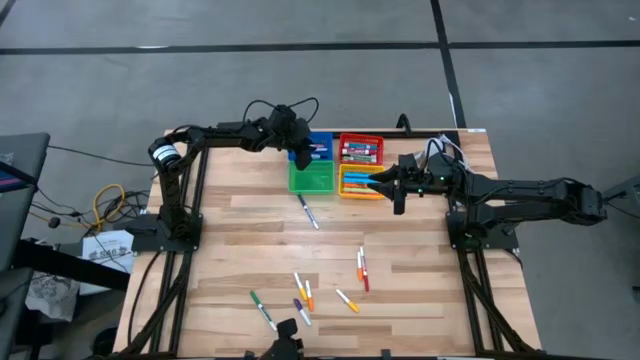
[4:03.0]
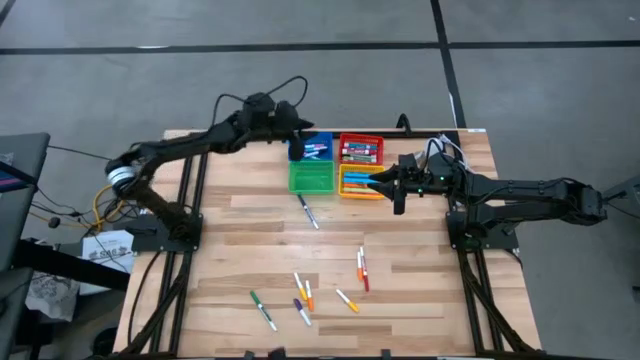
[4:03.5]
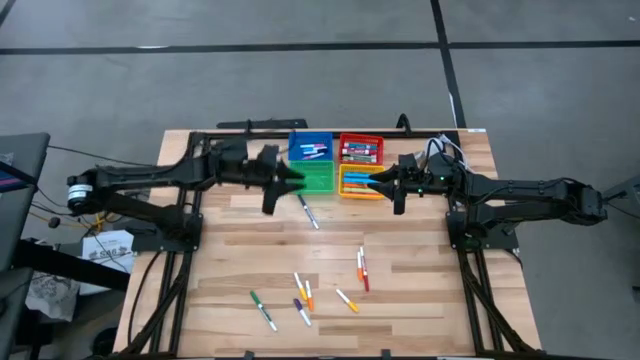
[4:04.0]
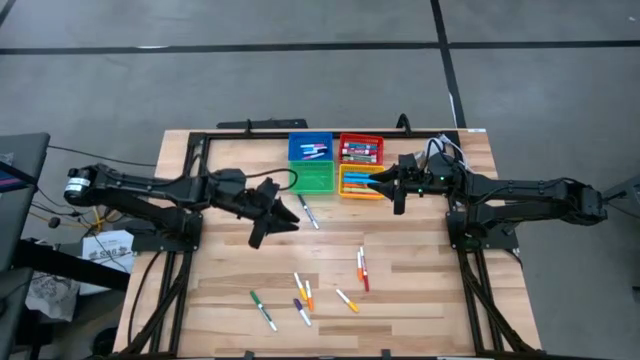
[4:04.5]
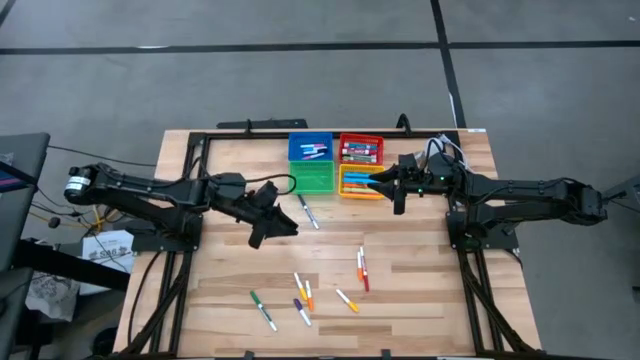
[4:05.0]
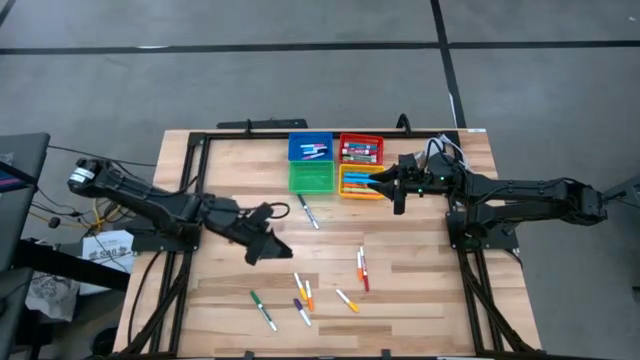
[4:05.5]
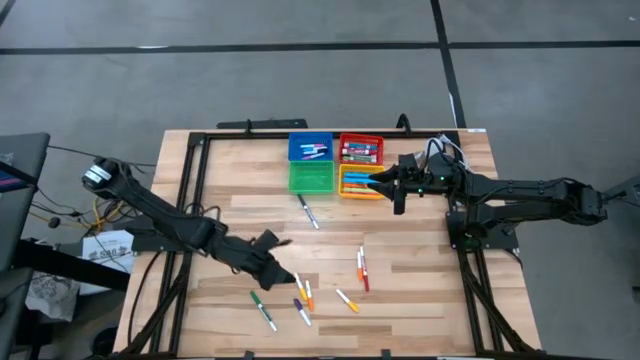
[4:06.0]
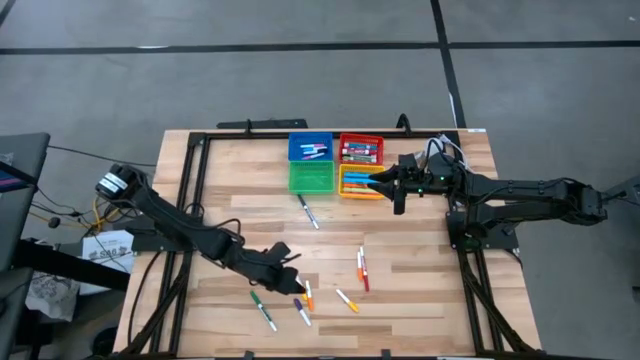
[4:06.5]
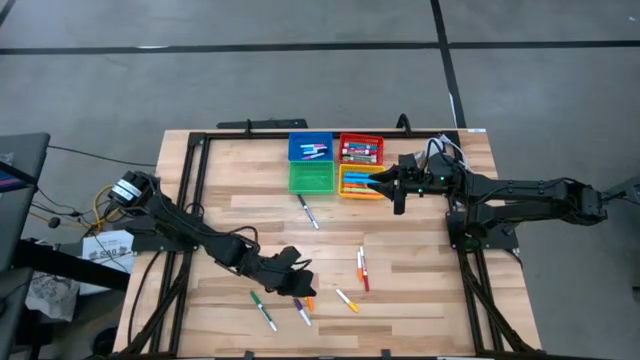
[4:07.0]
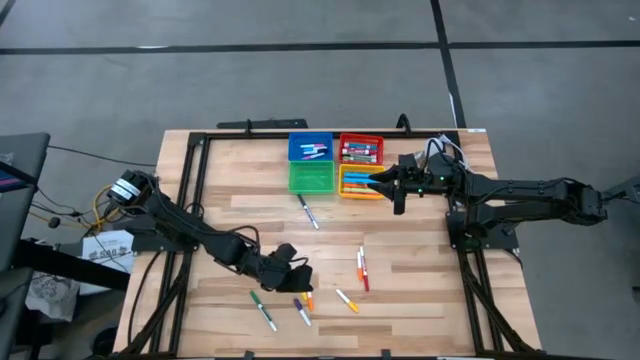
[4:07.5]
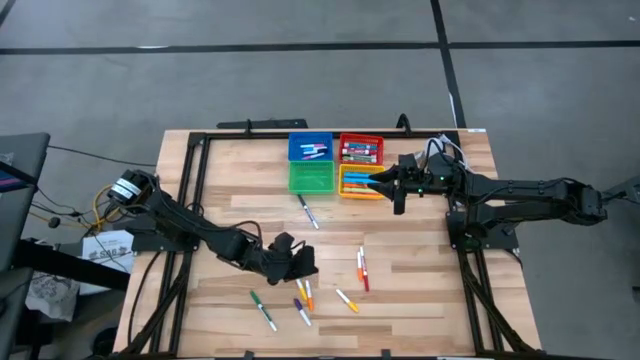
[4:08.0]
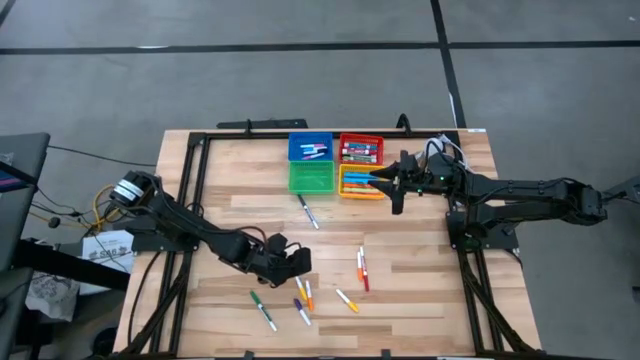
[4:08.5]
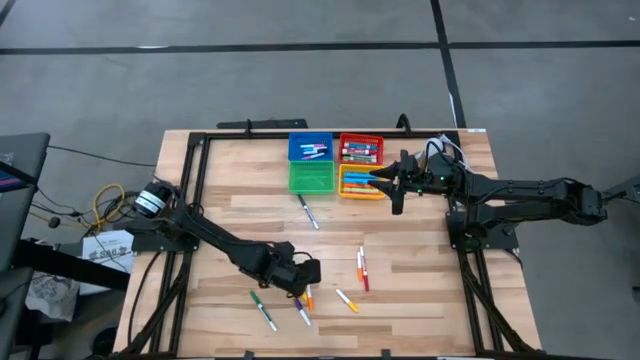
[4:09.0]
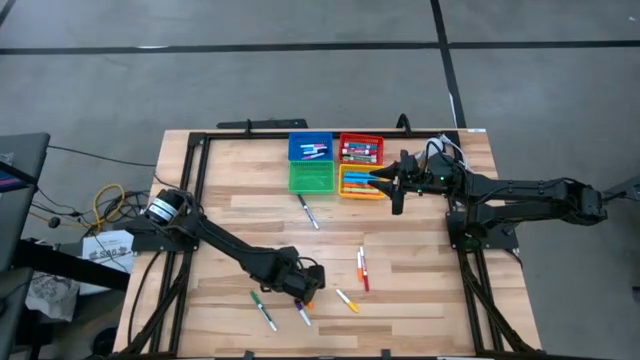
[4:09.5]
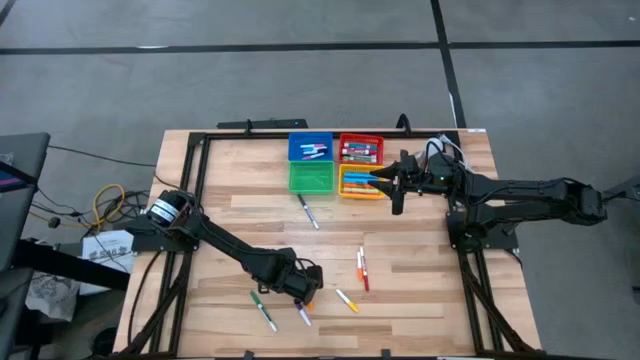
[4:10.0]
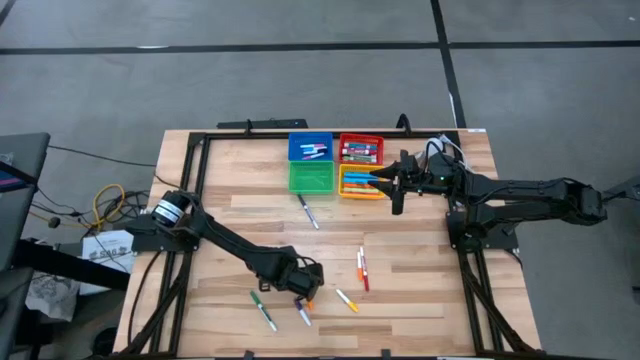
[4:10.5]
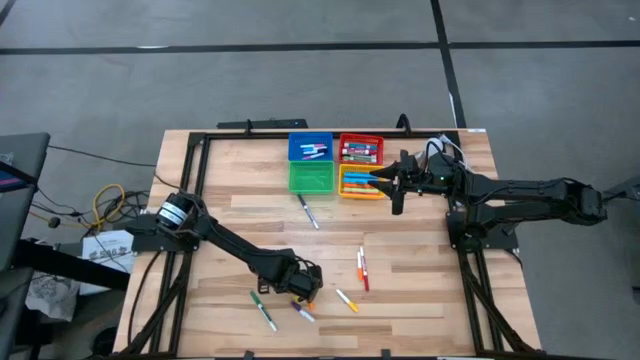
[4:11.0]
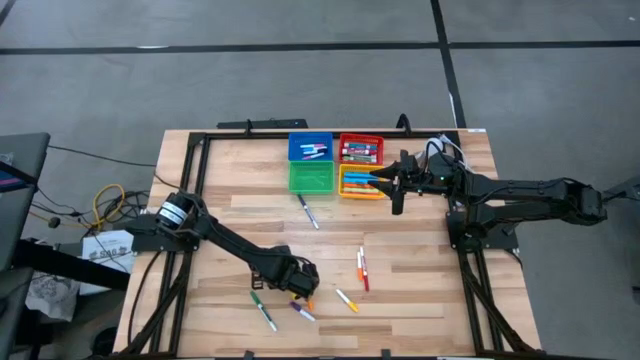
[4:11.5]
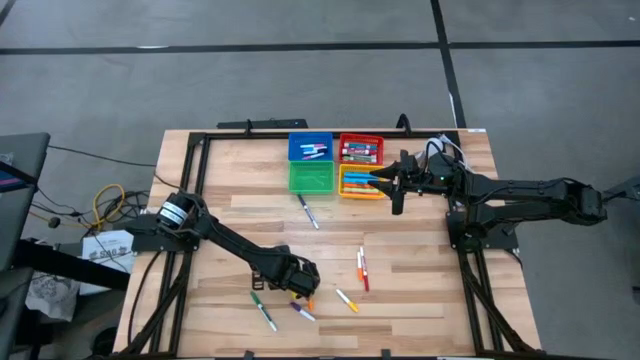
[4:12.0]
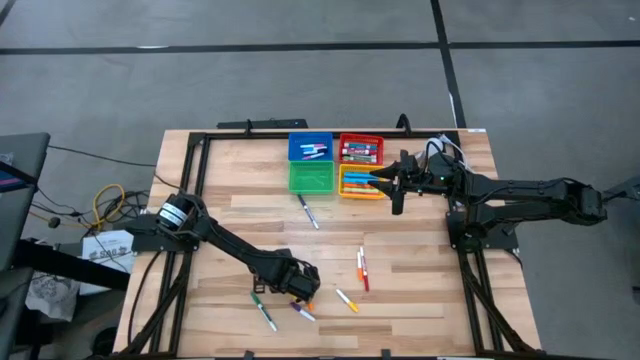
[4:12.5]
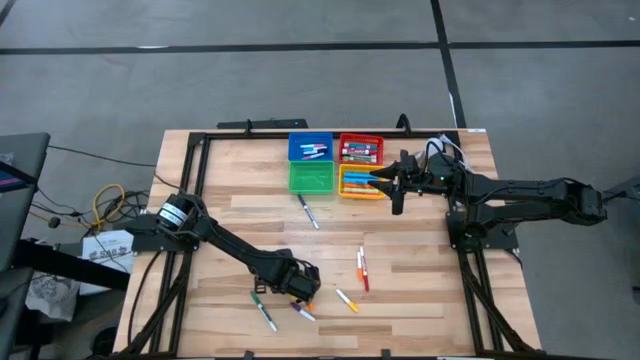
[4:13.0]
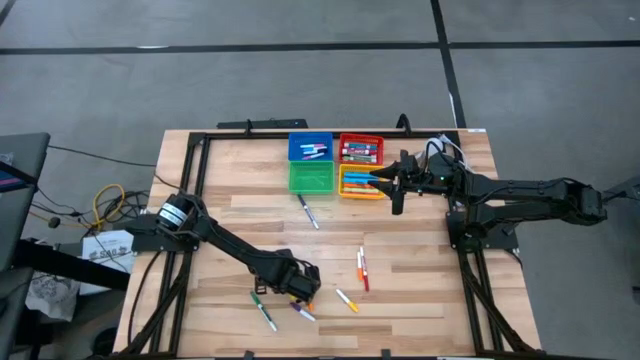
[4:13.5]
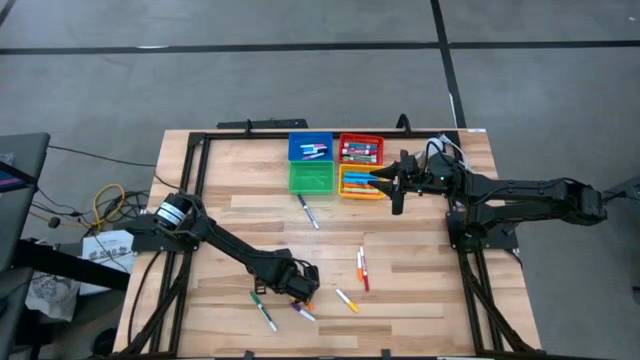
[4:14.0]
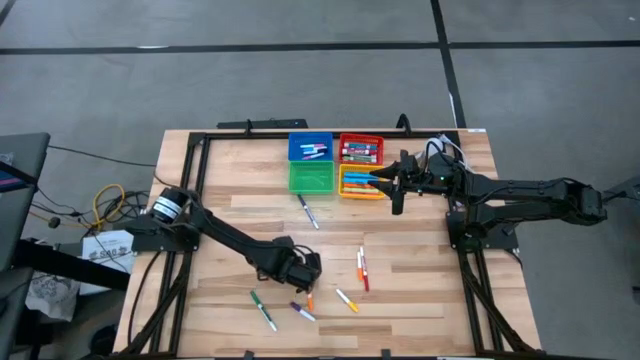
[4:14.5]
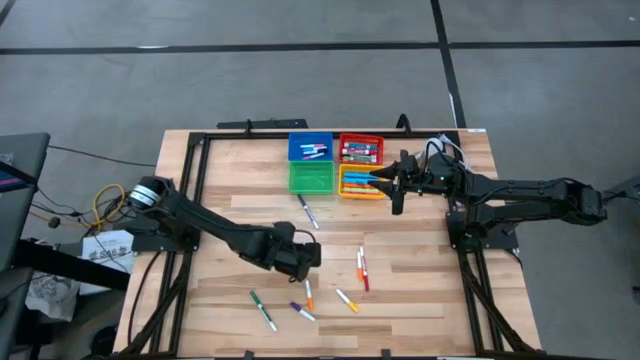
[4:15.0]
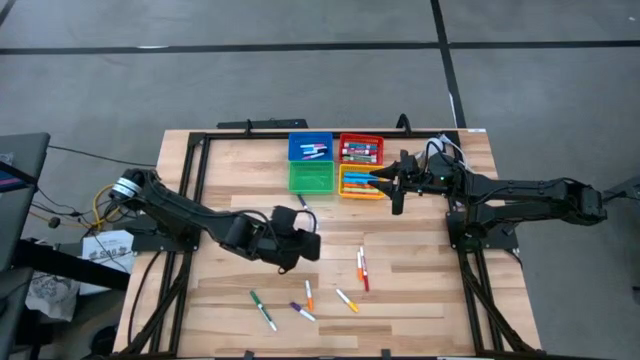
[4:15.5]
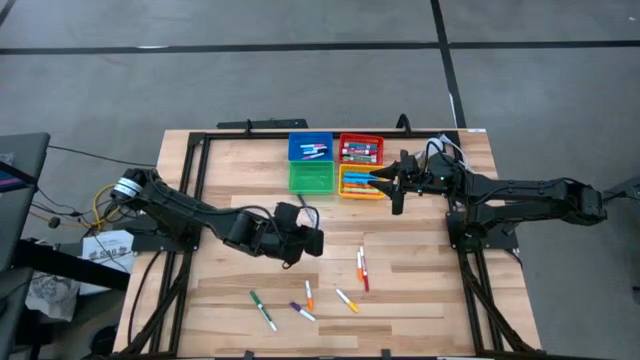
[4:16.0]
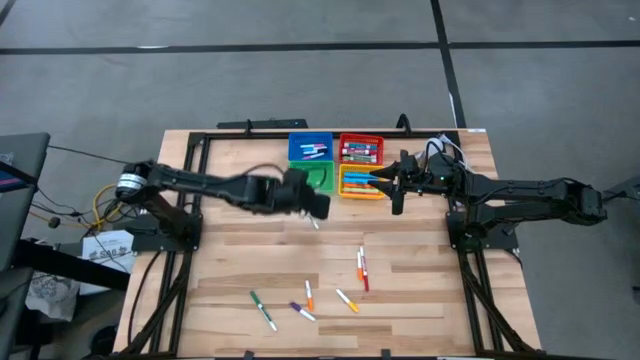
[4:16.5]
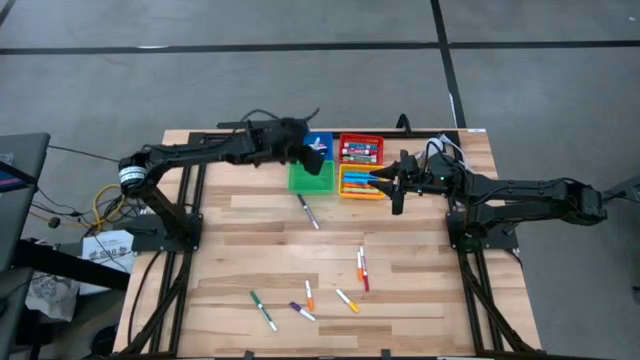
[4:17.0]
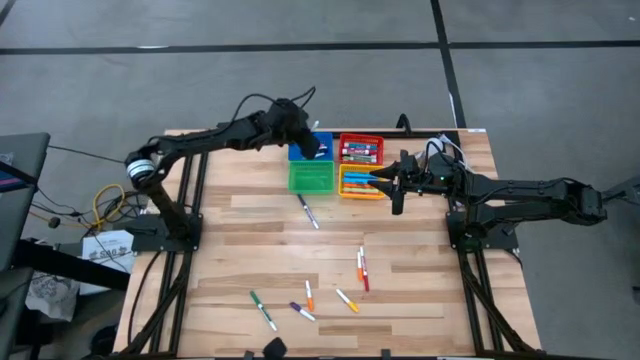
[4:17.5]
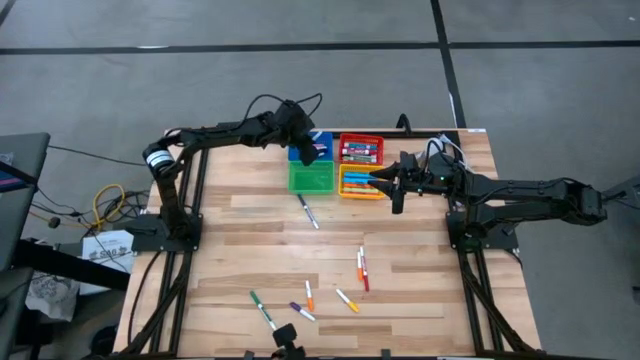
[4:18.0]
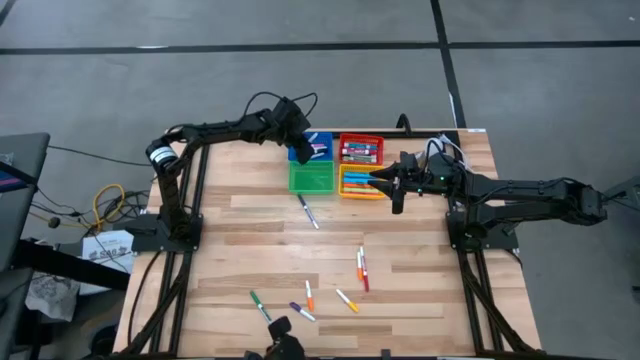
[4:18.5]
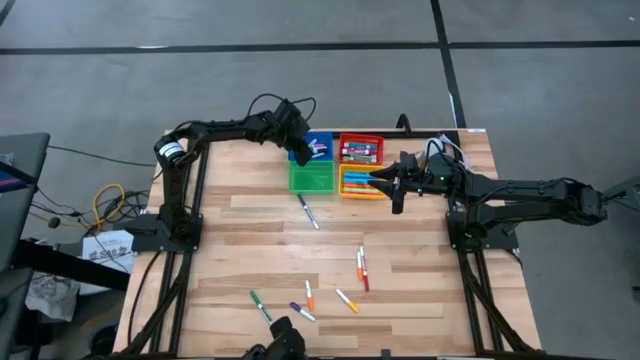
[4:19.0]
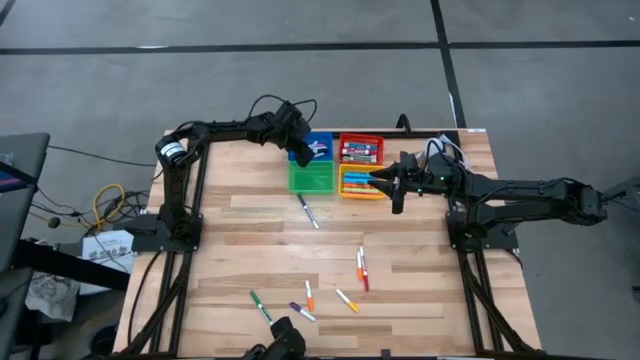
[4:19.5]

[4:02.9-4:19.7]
Task: Pick & Place Markers
Put the left yellow highlighter pen into the blue bin

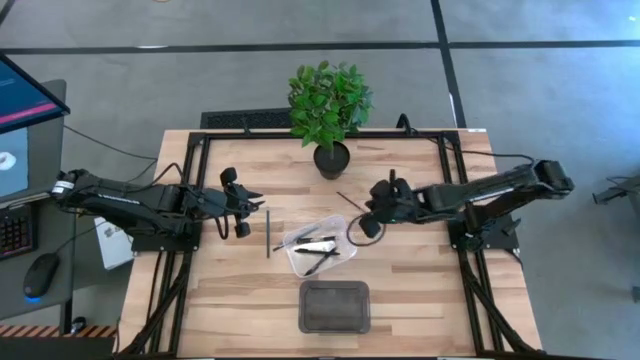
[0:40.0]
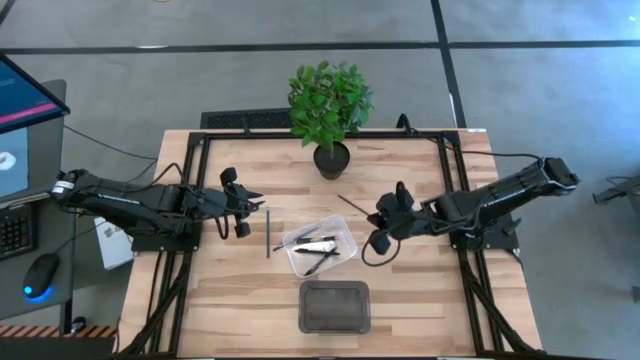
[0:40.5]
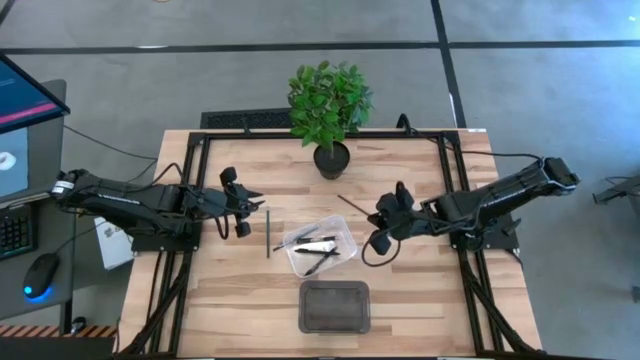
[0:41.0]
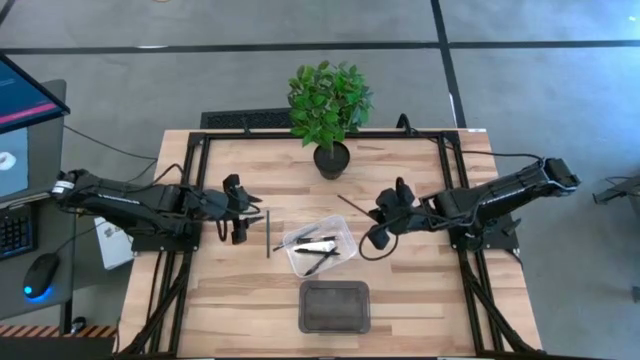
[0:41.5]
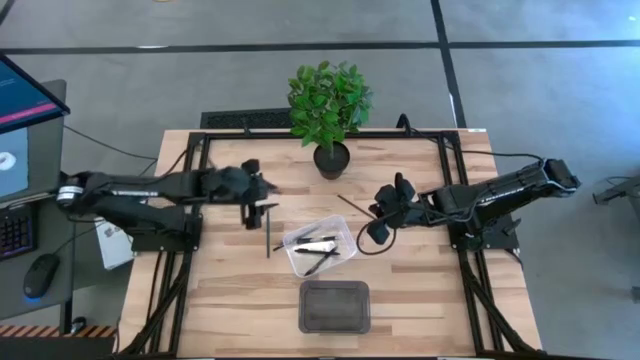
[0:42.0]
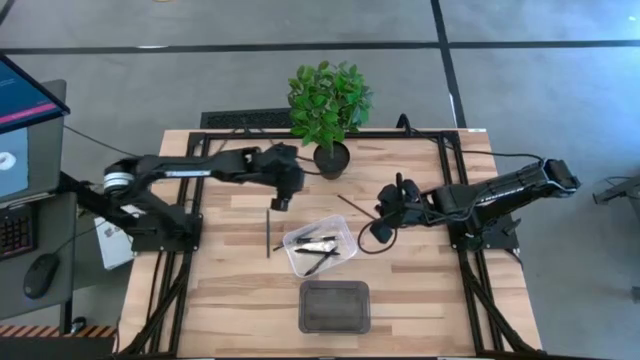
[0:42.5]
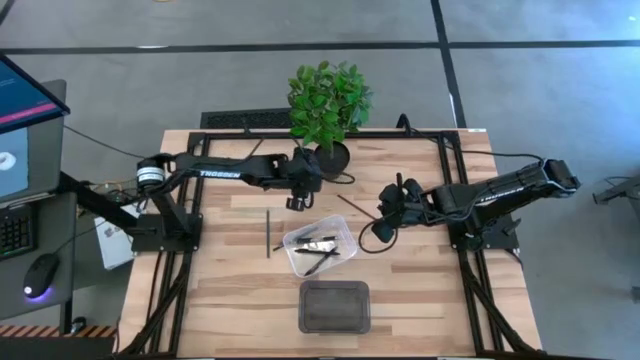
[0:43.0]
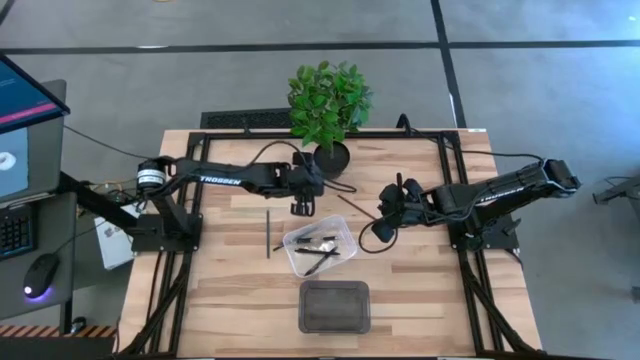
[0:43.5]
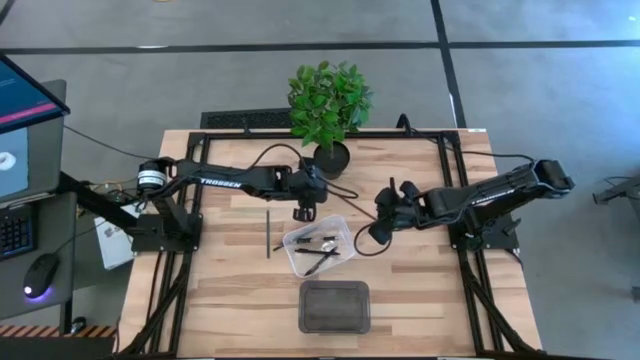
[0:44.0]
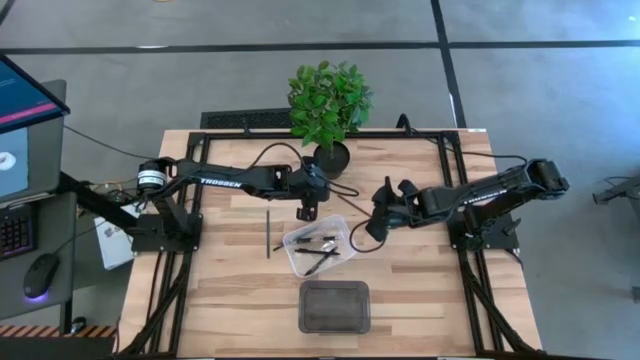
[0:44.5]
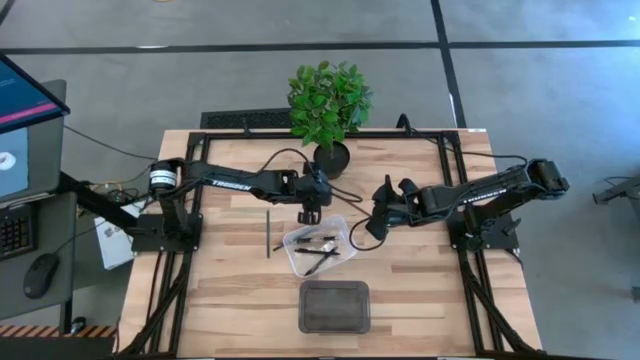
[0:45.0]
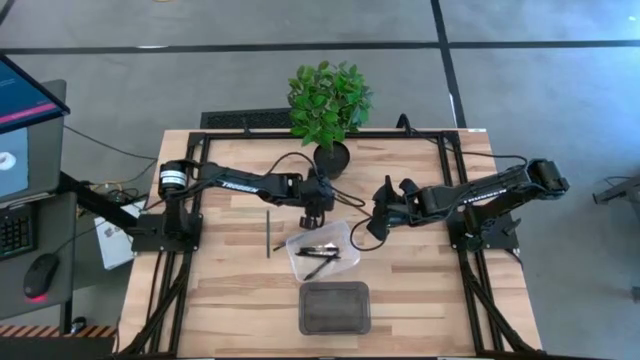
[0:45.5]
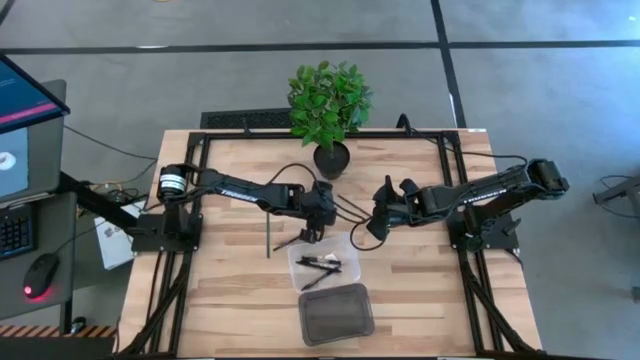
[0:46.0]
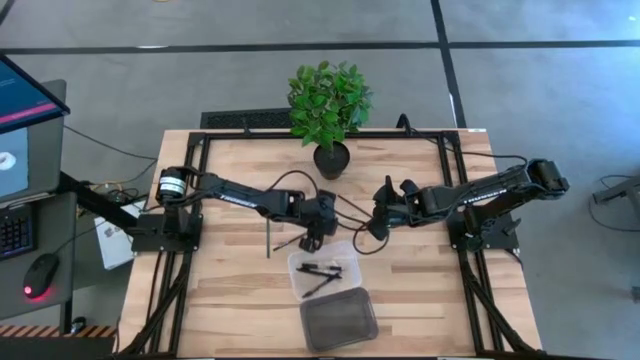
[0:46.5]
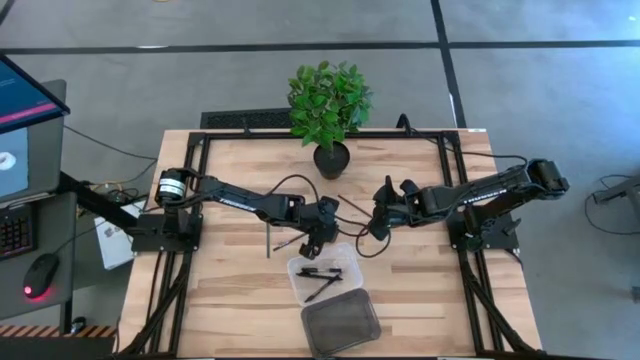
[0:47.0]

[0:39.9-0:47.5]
Task: Sort pens & pencils
Adjust the transparent bin on the table
